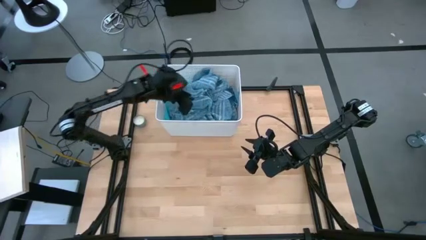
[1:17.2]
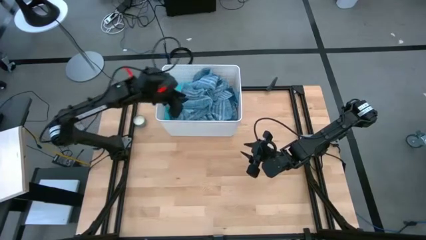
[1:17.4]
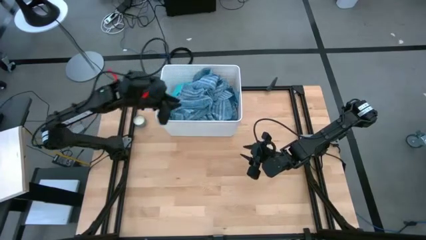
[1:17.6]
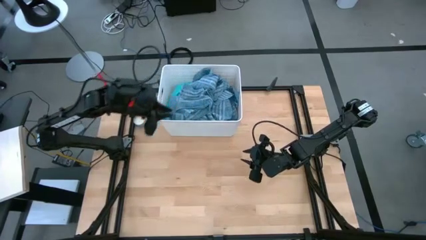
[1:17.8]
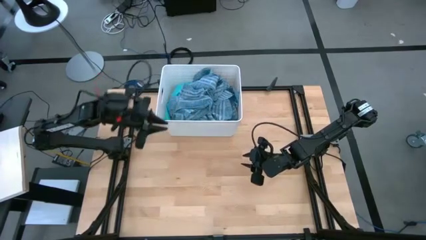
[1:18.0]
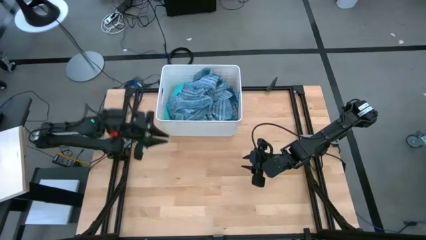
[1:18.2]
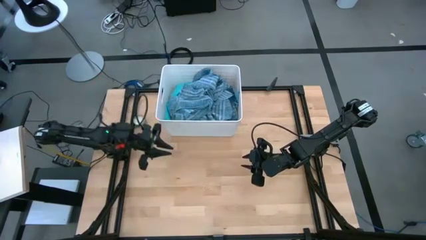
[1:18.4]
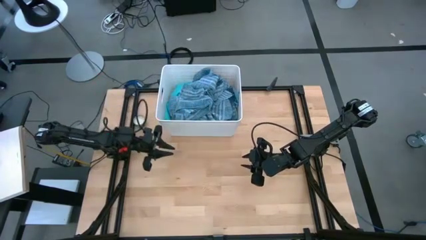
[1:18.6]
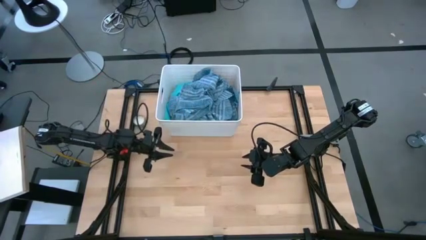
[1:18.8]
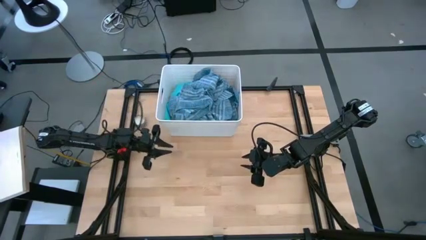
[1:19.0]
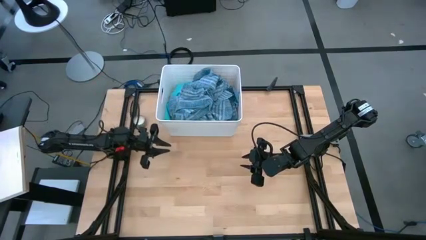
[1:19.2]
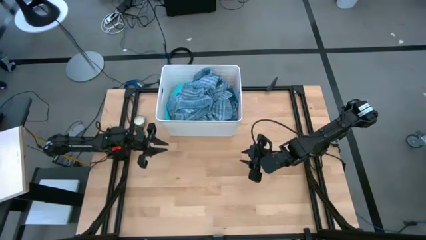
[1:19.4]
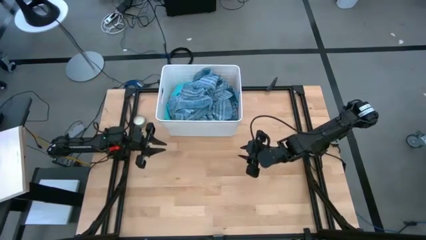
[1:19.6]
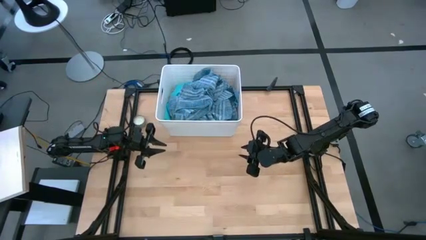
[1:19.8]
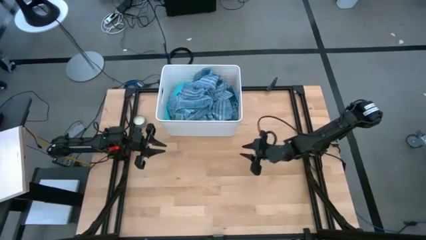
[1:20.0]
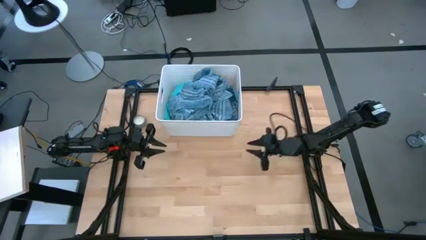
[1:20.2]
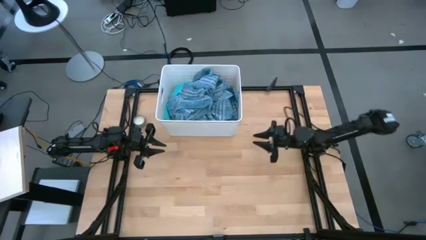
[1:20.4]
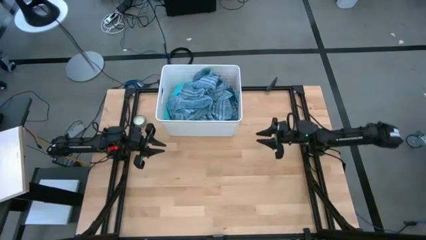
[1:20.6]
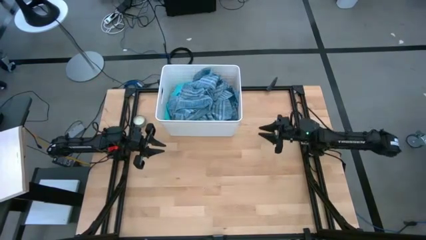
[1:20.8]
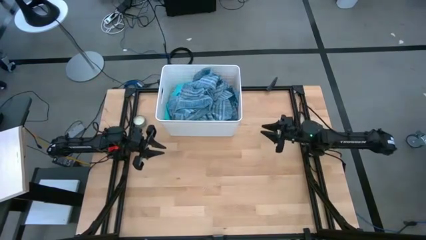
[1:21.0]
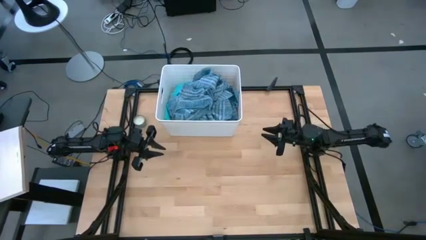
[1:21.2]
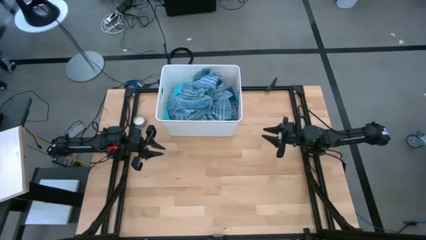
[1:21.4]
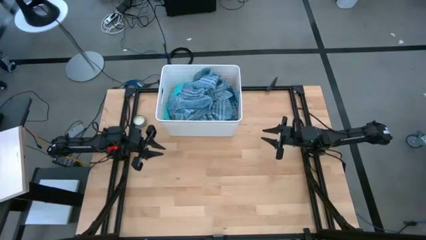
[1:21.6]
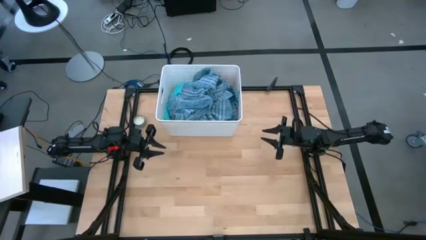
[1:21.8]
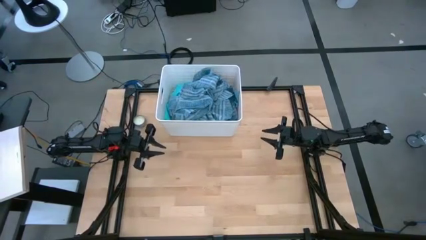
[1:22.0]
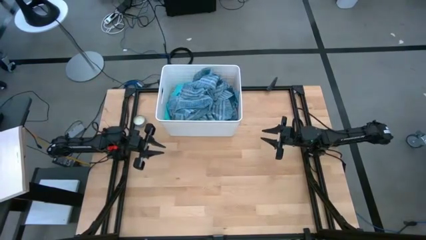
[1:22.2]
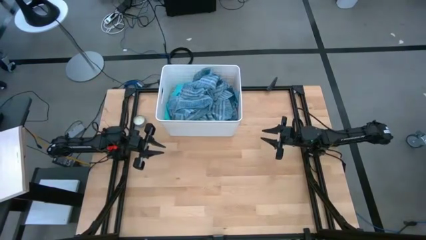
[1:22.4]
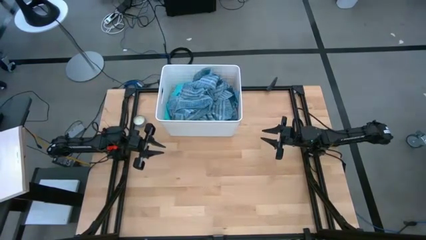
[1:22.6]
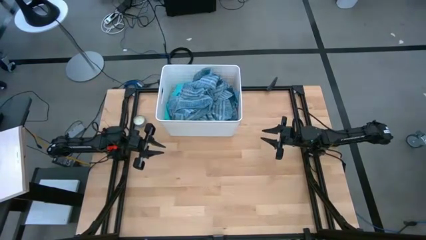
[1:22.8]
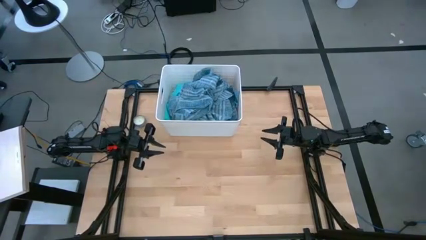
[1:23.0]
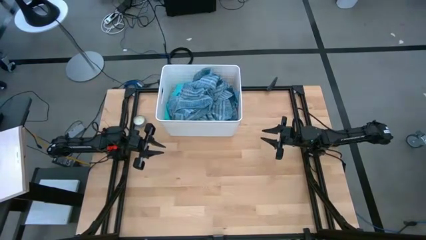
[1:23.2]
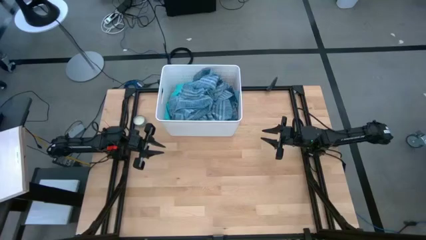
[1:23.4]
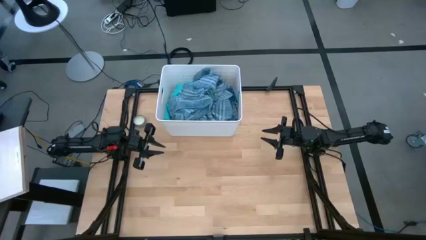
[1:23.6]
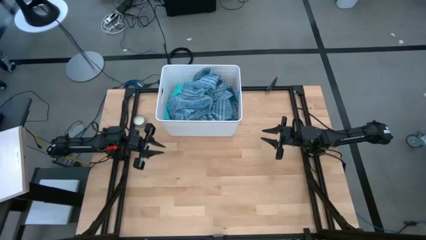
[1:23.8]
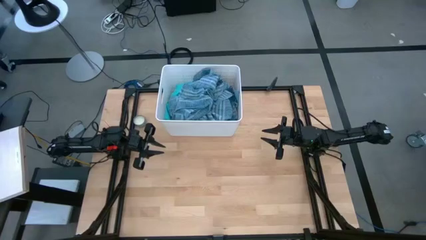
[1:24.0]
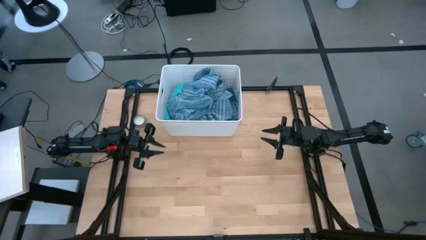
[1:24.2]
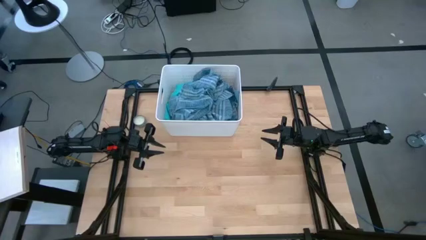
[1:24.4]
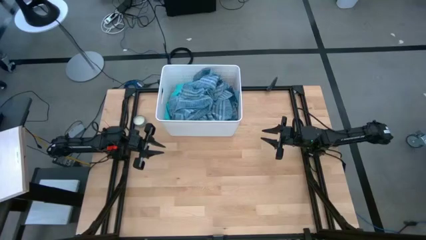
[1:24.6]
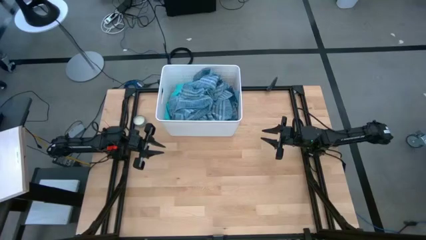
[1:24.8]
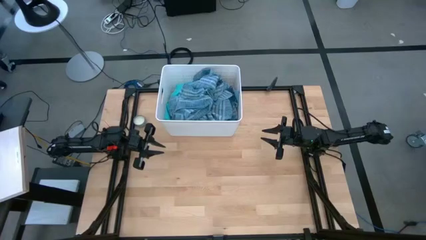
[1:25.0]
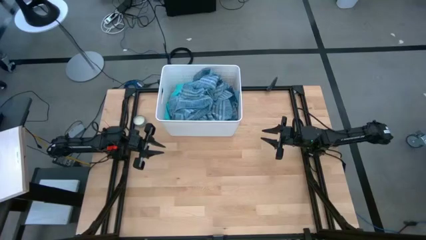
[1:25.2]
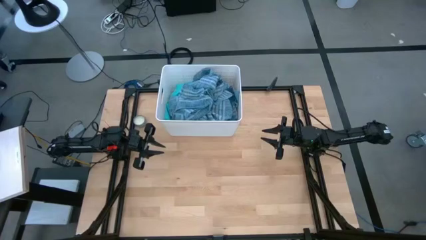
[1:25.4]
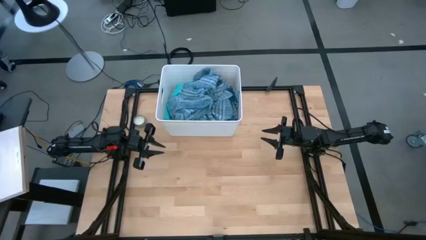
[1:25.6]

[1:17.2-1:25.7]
Task: Sort clothes
Return to Home Position
